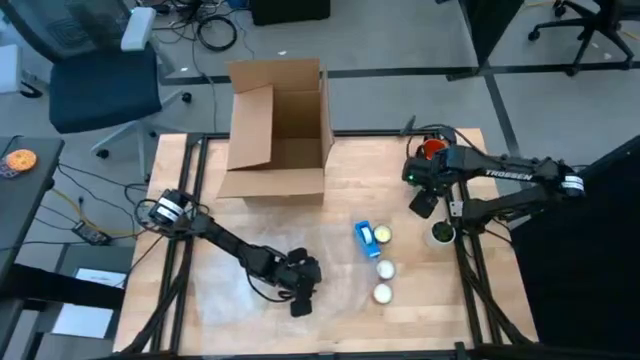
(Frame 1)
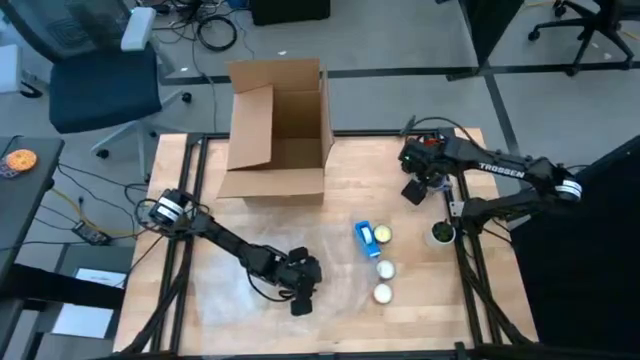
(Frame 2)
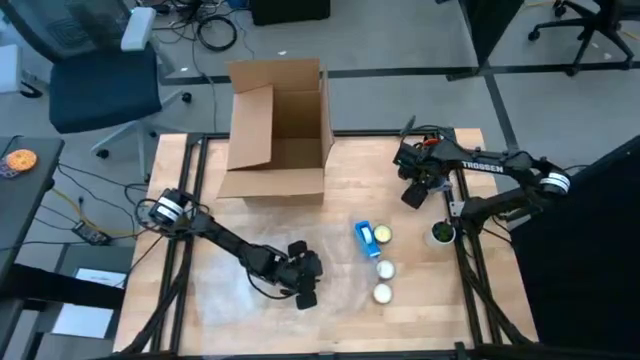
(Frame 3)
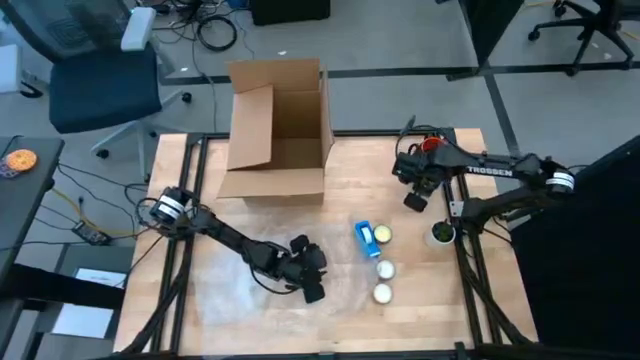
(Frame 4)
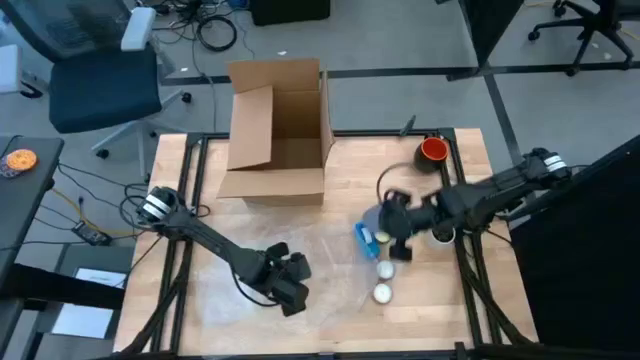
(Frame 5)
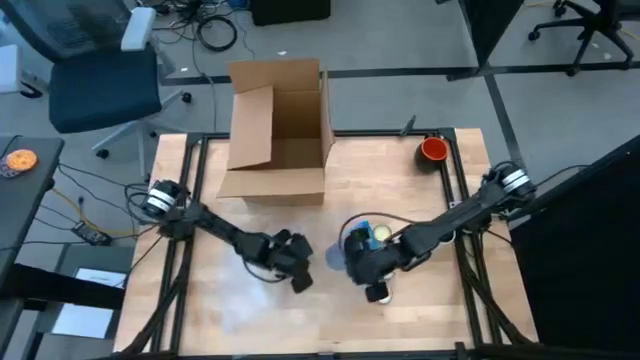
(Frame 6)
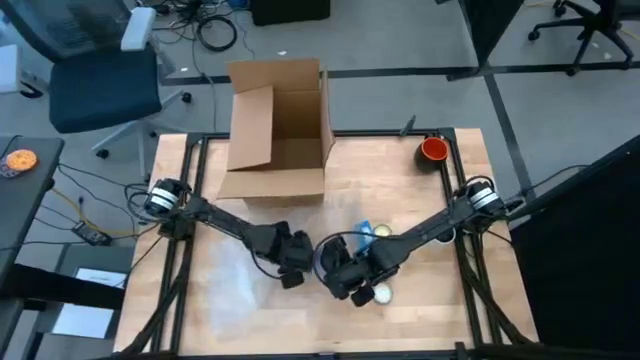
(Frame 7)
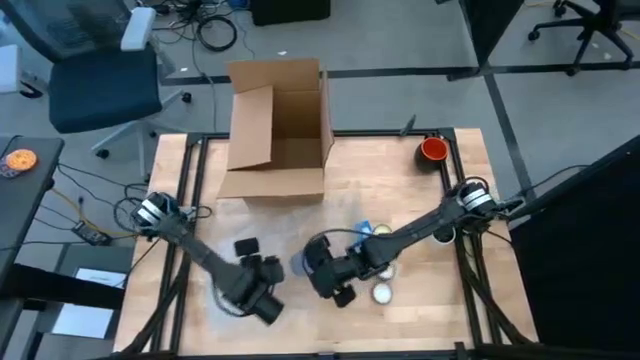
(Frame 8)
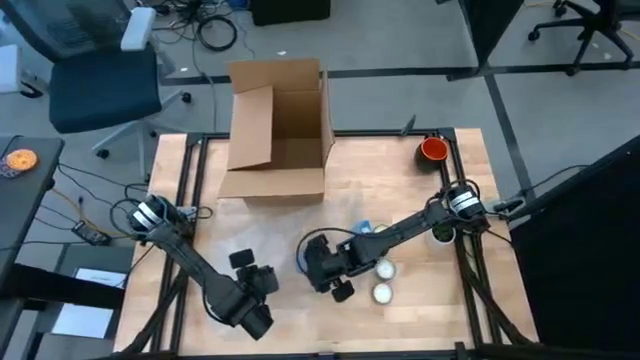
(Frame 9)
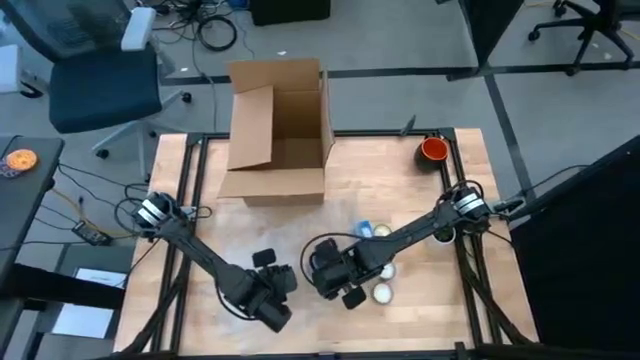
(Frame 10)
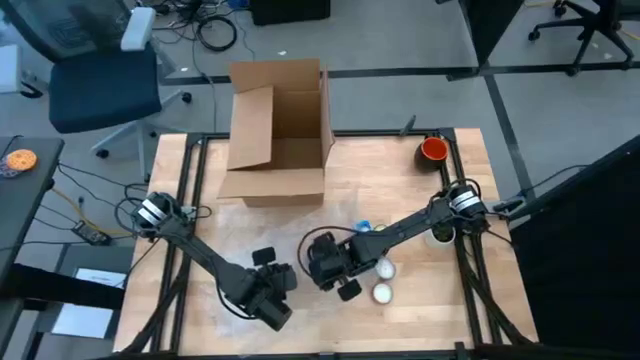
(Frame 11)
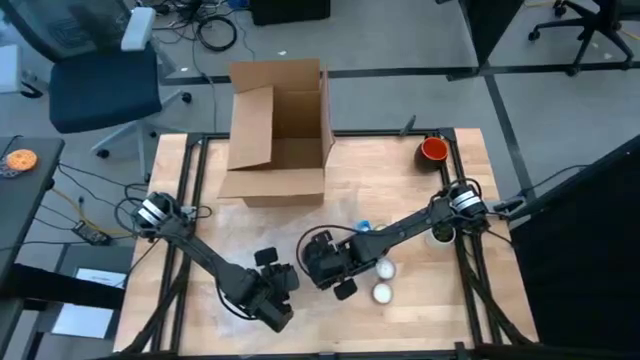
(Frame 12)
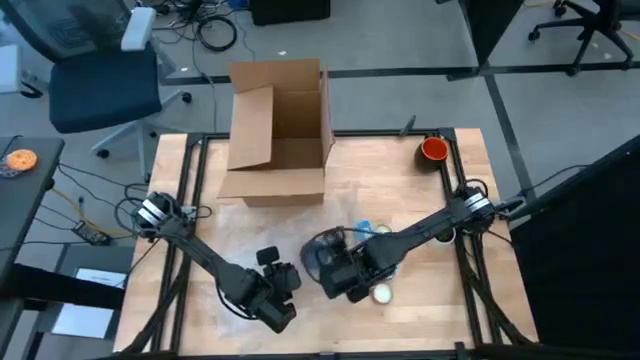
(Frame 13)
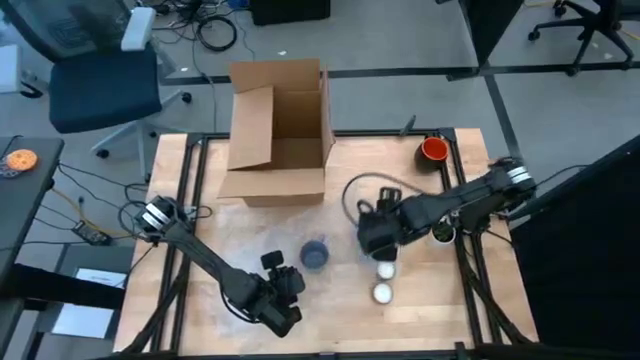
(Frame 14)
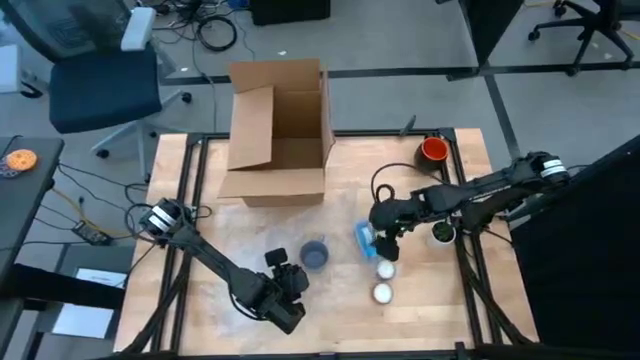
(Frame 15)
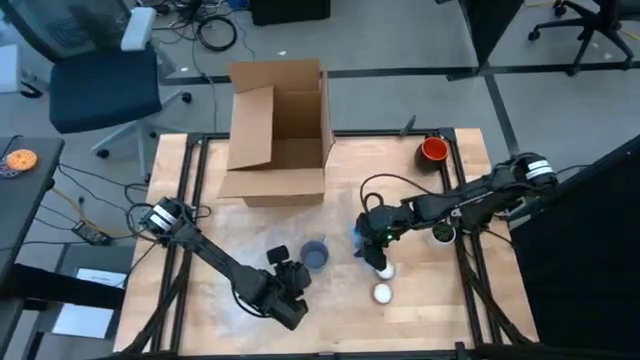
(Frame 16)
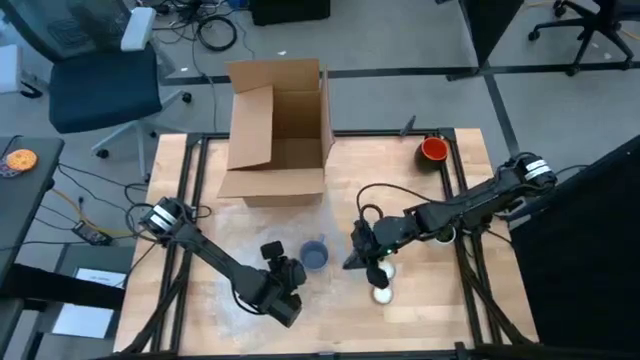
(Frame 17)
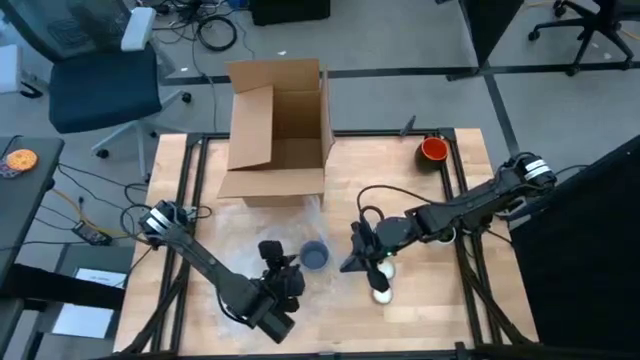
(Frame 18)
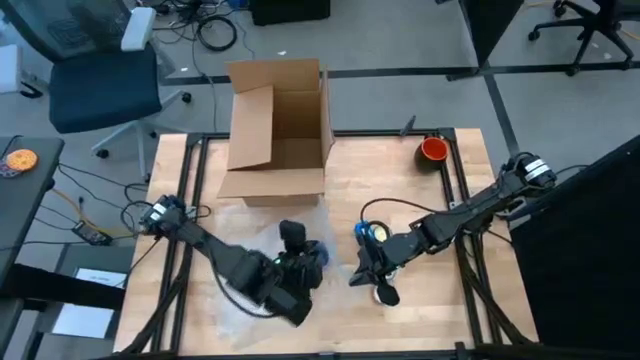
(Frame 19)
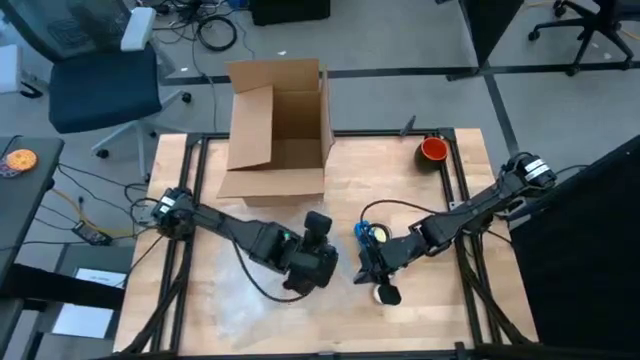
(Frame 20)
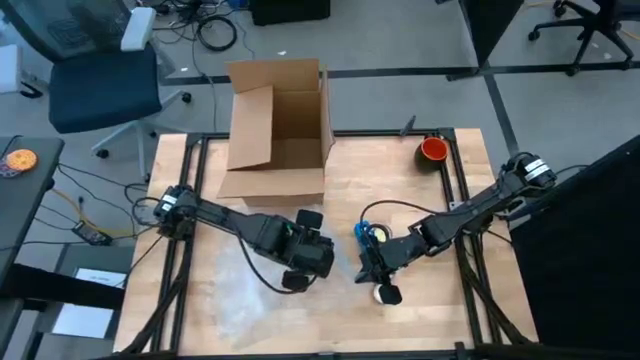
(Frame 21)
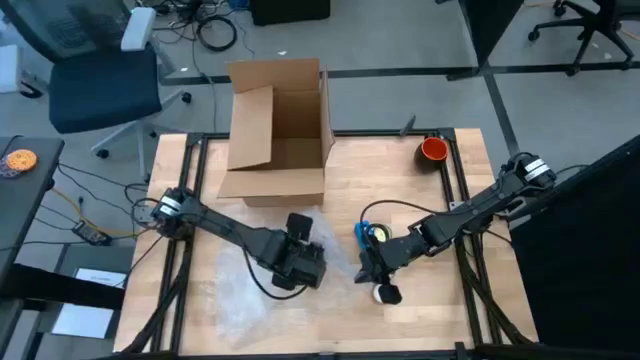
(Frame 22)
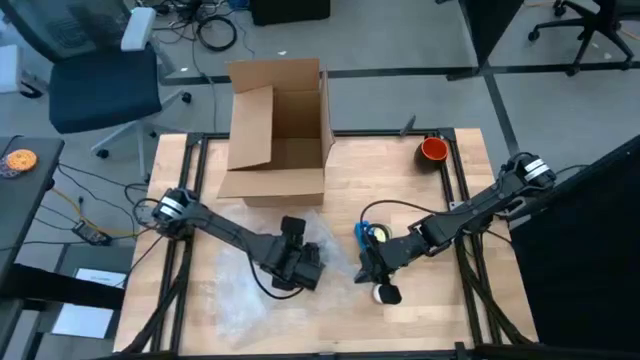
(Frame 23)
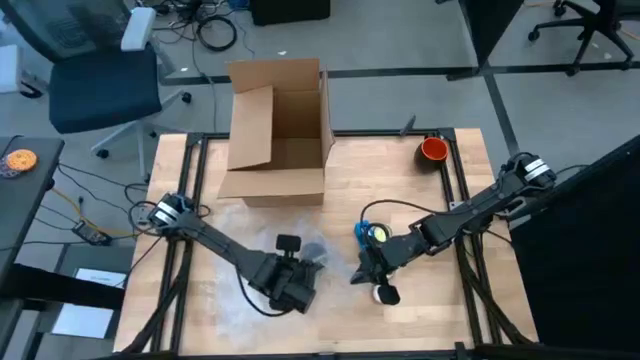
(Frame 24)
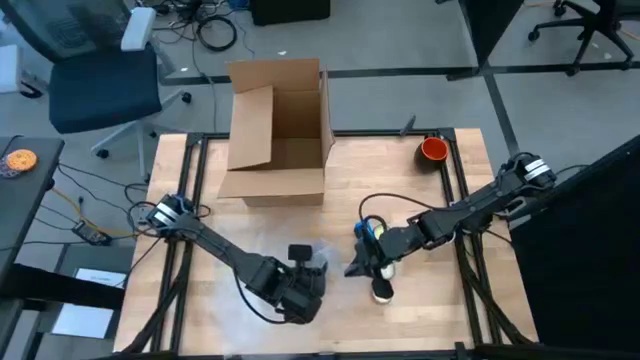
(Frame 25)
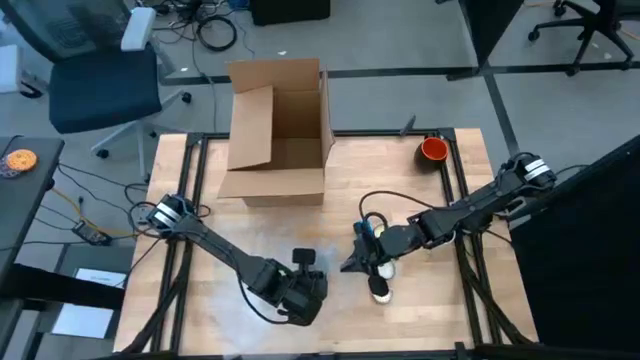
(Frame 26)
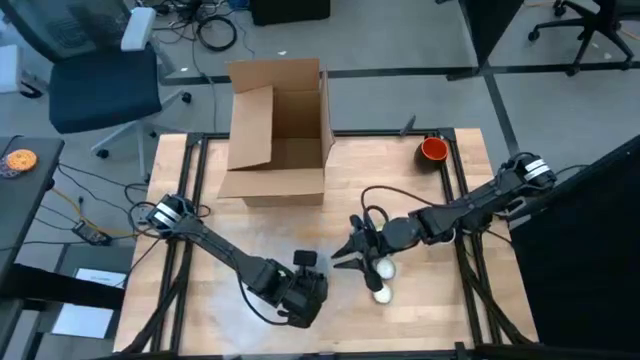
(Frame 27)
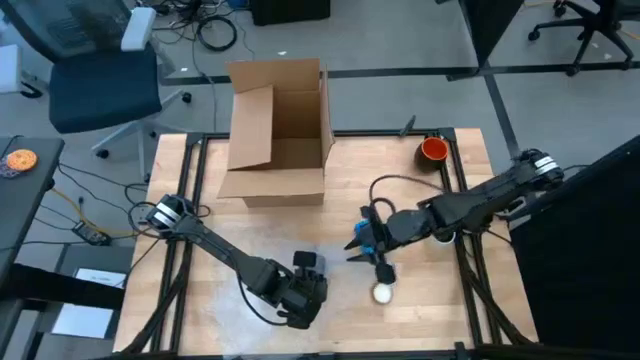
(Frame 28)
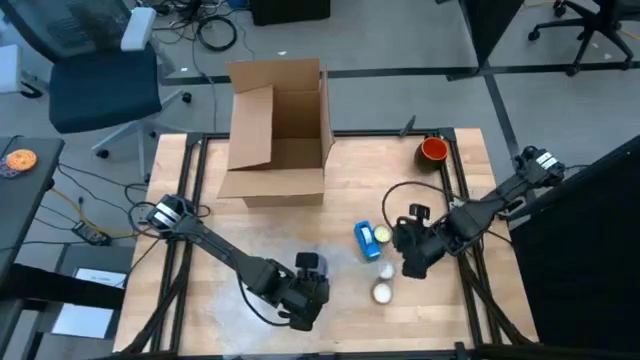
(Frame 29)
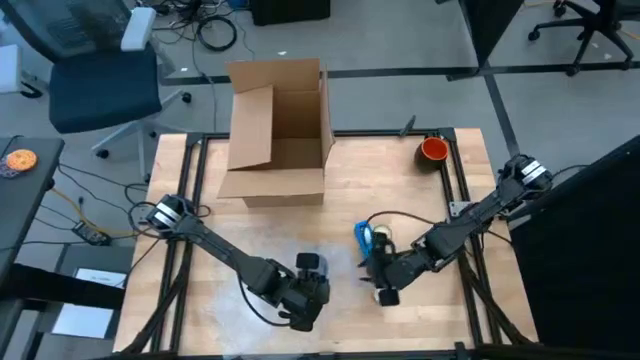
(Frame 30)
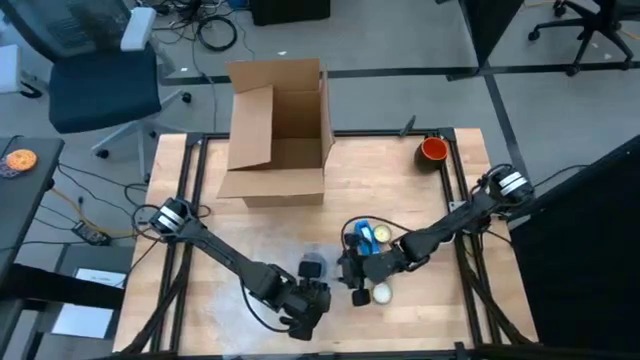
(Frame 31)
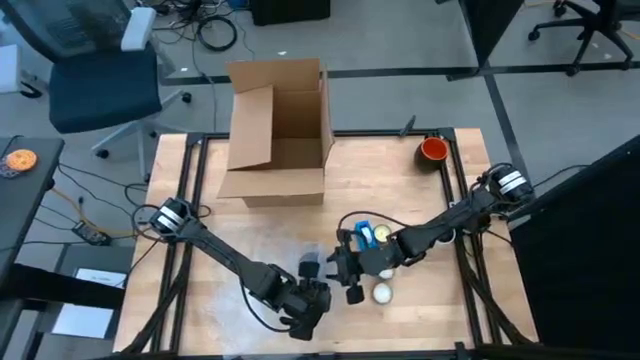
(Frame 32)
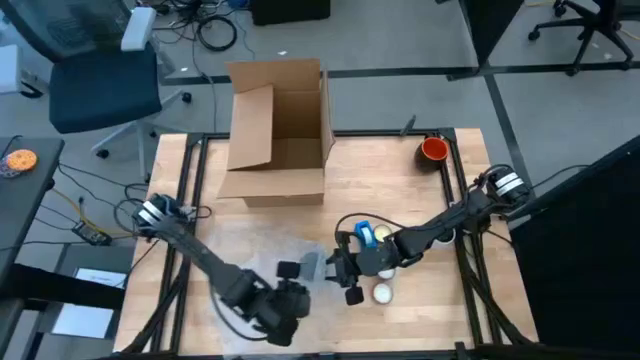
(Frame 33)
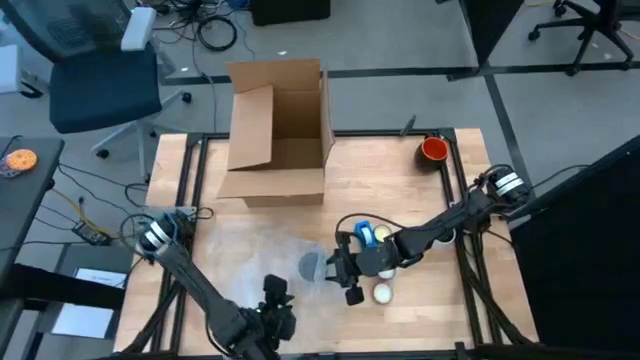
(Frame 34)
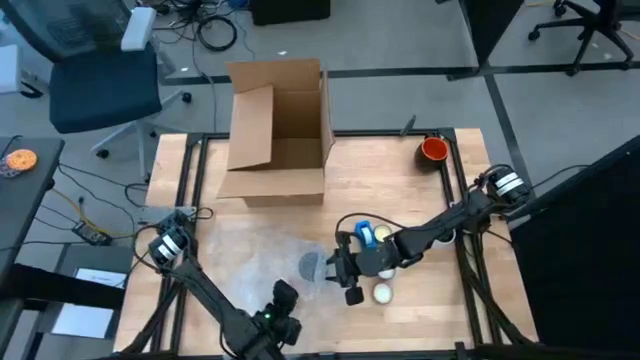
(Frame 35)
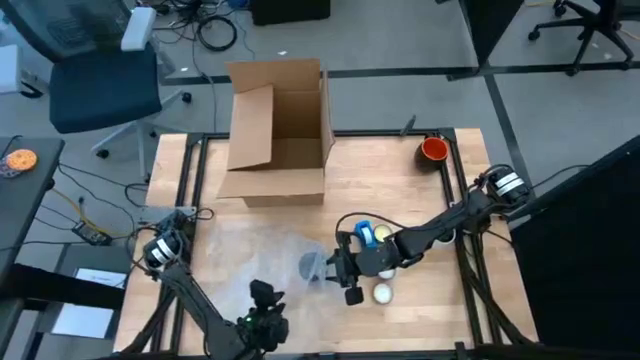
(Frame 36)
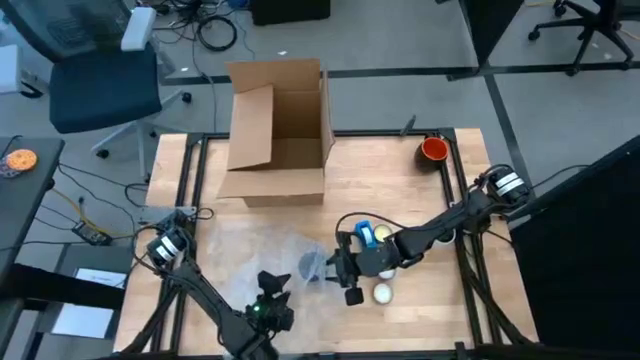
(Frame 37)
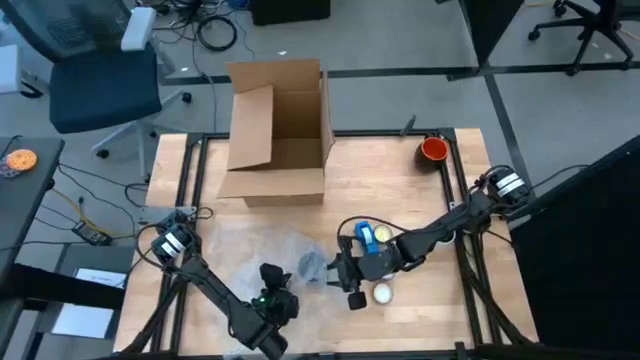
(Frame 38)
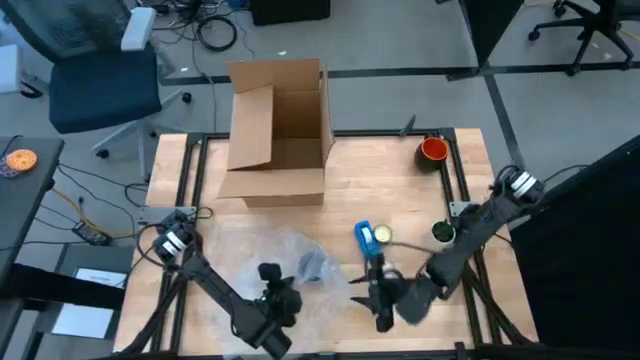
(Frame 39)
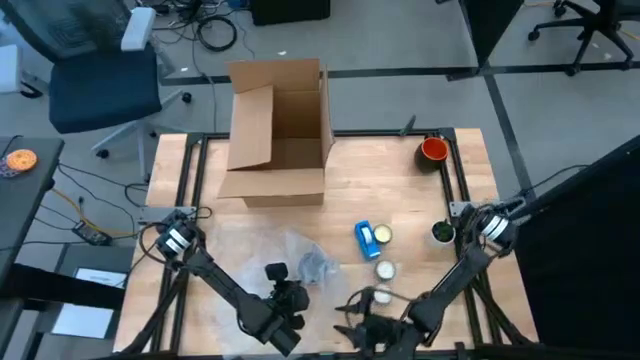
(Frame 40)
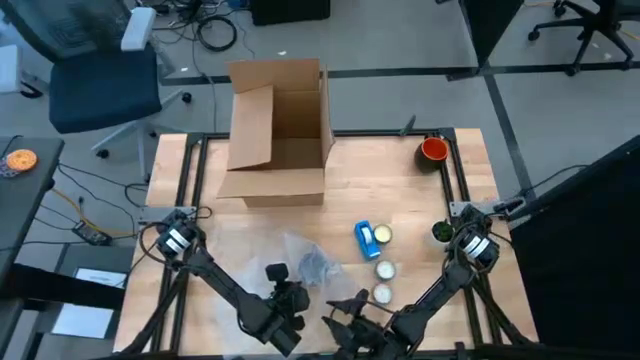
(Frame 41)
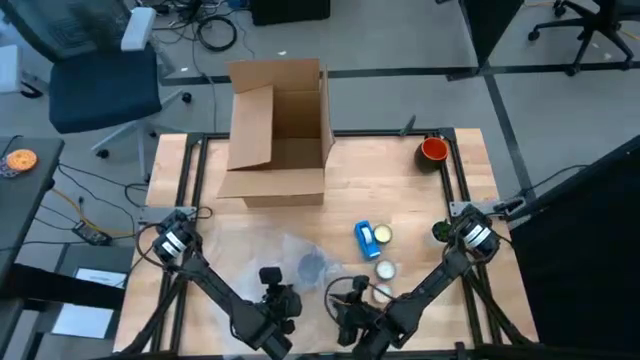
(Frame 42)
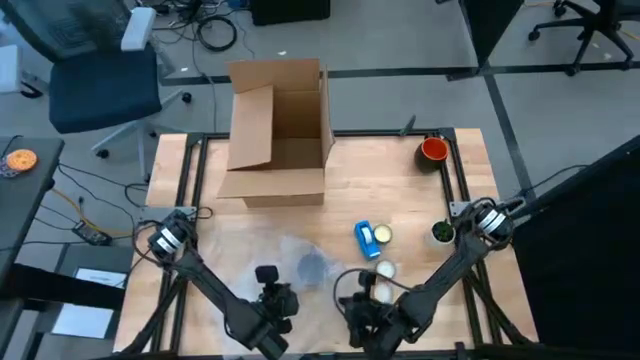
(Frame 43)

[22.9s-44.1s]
Task: wrap mug
Wrap the blue mug with the bubble wrap
